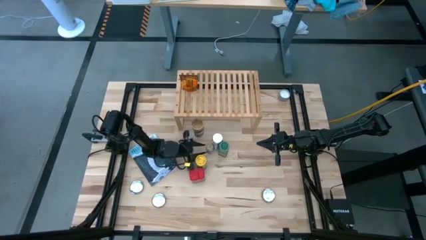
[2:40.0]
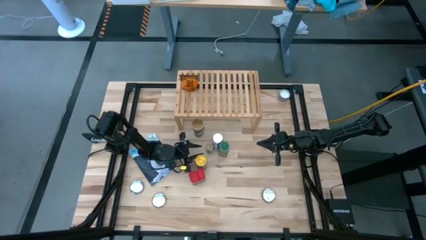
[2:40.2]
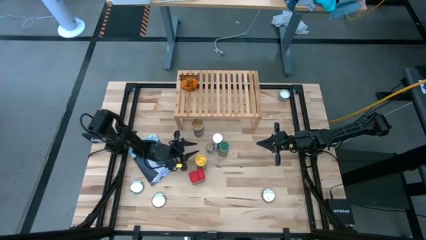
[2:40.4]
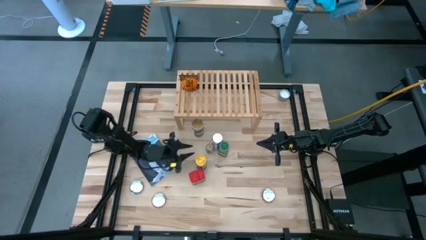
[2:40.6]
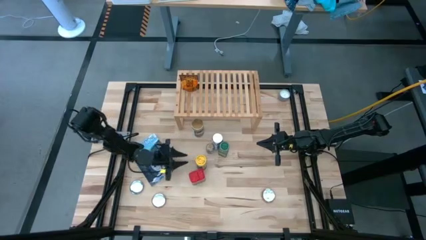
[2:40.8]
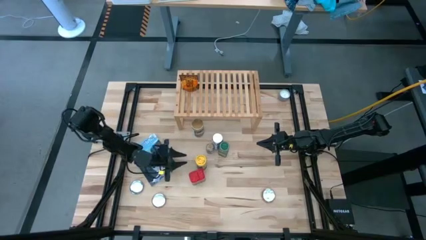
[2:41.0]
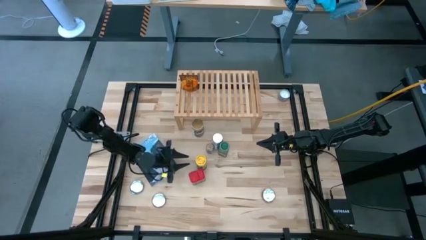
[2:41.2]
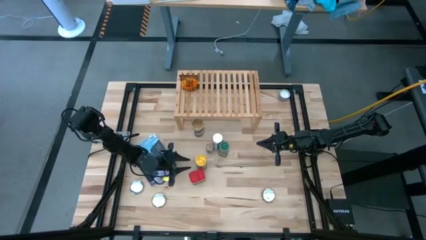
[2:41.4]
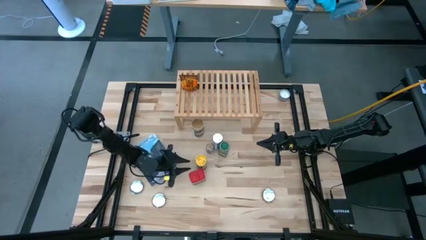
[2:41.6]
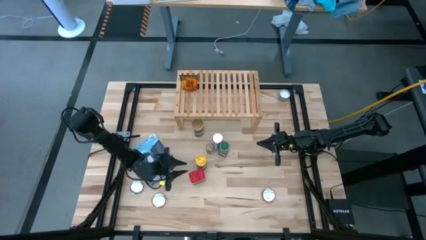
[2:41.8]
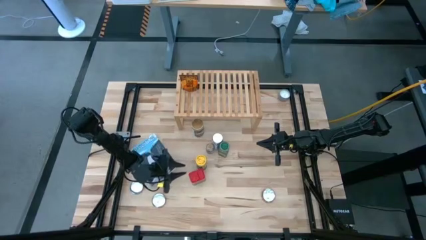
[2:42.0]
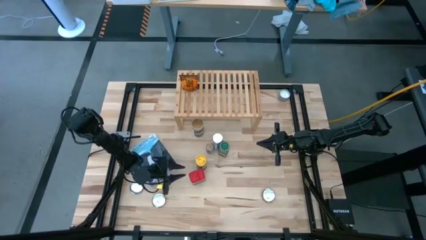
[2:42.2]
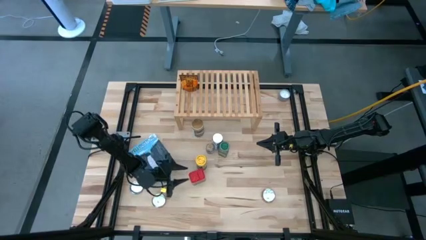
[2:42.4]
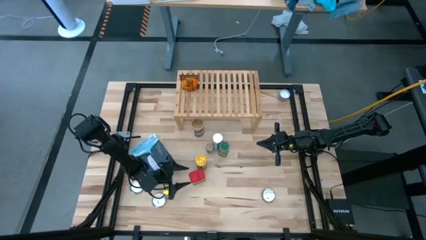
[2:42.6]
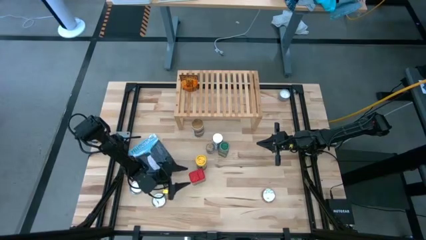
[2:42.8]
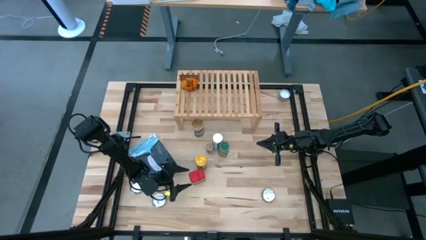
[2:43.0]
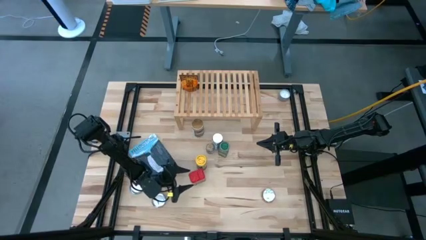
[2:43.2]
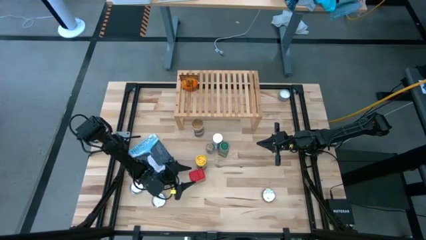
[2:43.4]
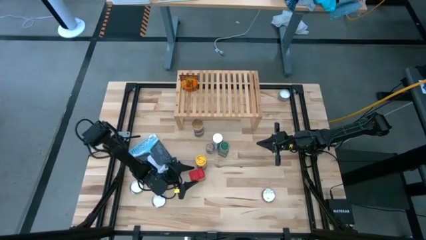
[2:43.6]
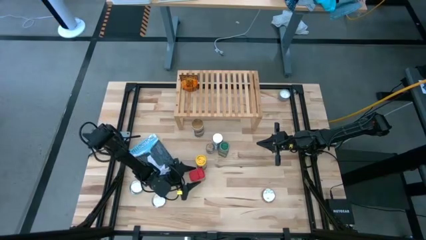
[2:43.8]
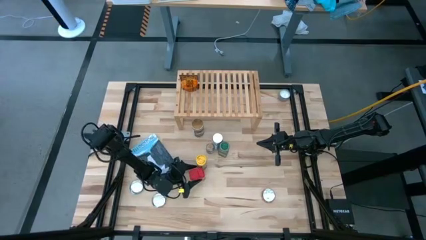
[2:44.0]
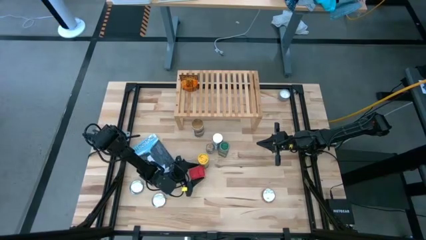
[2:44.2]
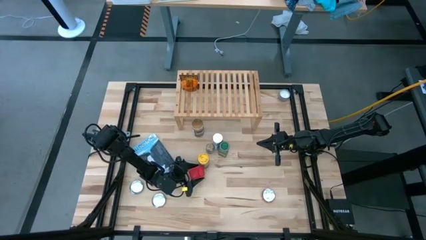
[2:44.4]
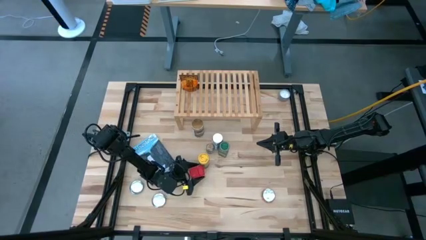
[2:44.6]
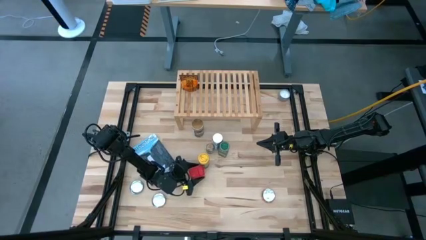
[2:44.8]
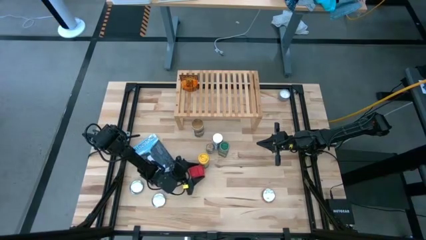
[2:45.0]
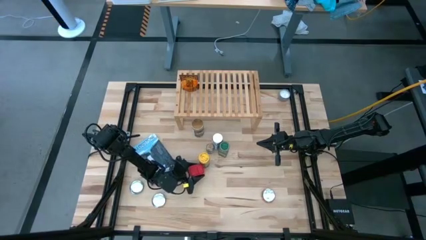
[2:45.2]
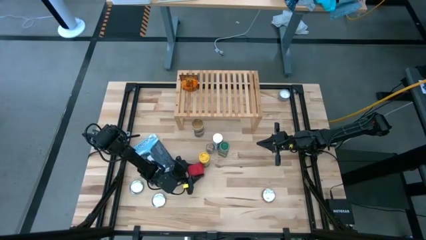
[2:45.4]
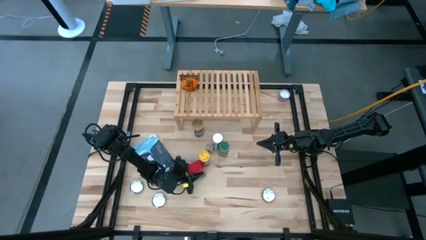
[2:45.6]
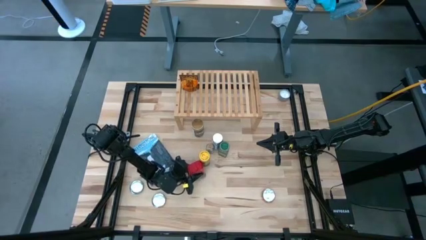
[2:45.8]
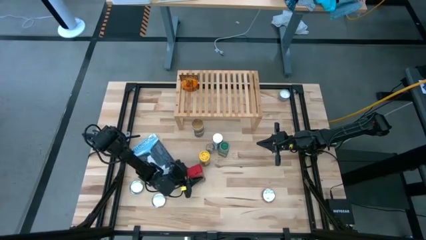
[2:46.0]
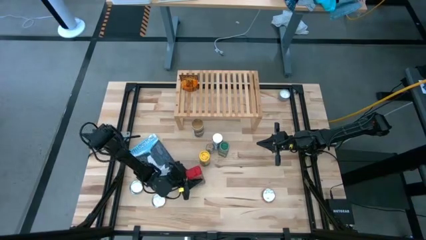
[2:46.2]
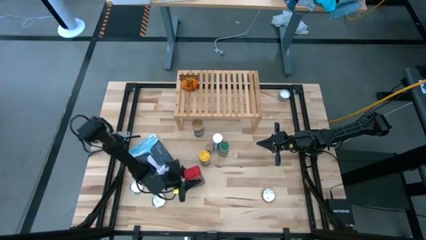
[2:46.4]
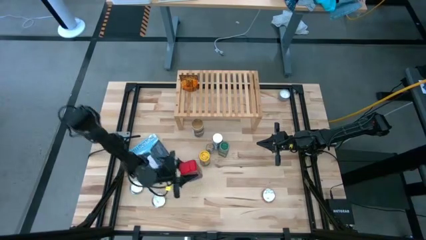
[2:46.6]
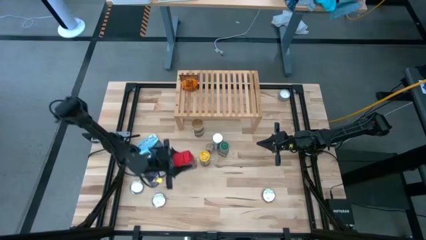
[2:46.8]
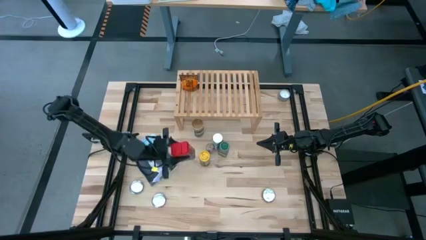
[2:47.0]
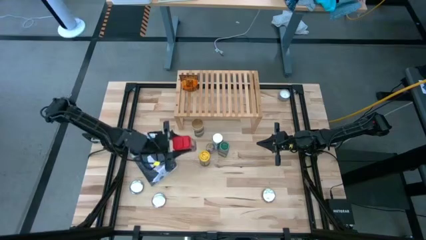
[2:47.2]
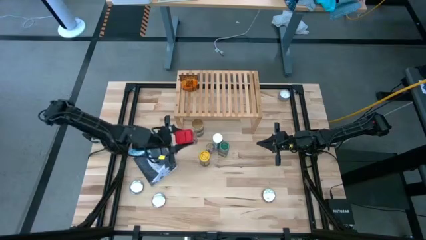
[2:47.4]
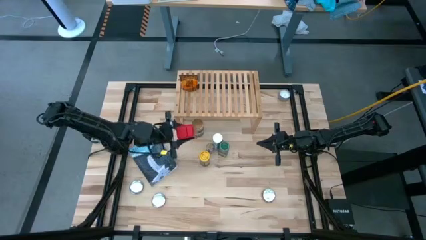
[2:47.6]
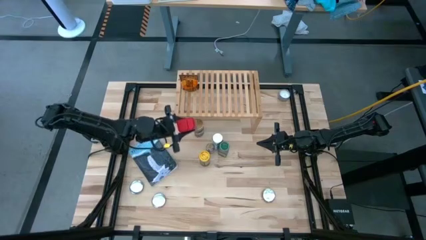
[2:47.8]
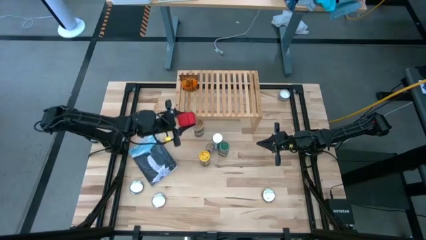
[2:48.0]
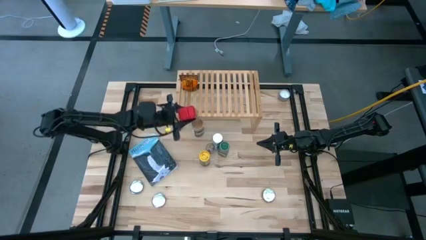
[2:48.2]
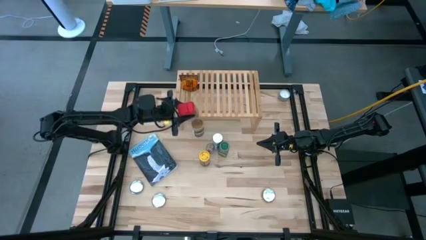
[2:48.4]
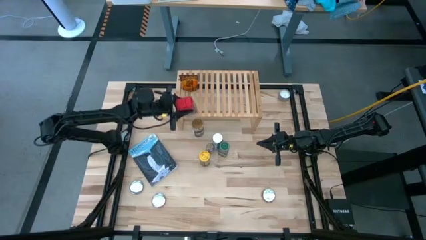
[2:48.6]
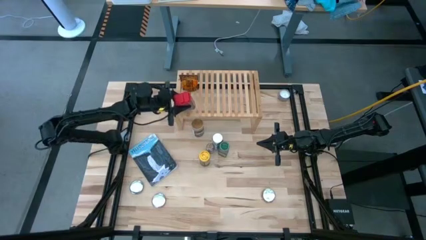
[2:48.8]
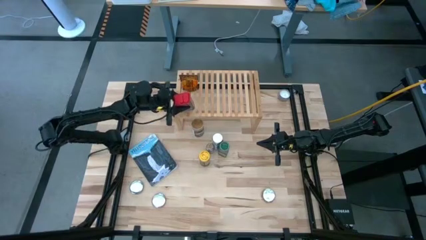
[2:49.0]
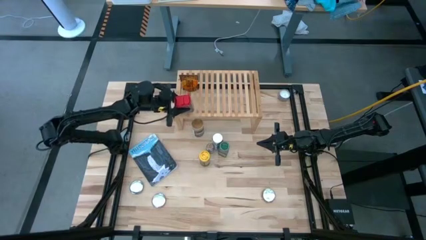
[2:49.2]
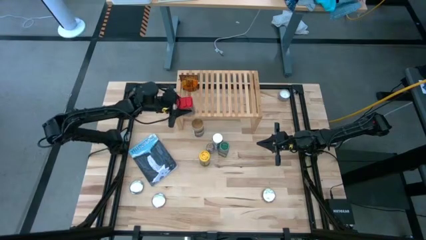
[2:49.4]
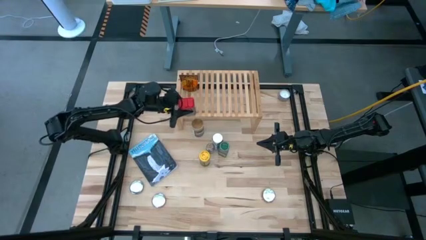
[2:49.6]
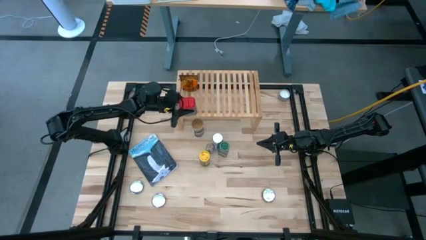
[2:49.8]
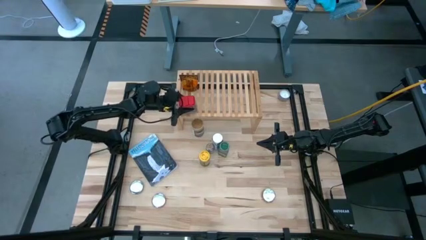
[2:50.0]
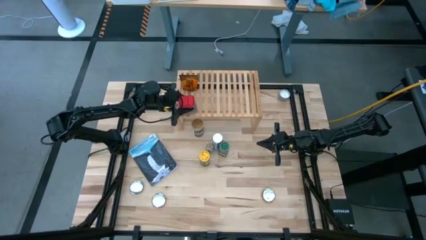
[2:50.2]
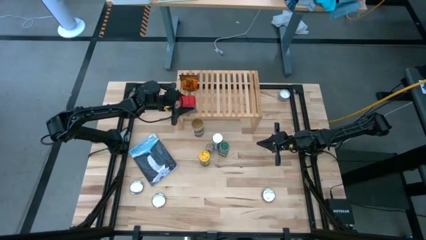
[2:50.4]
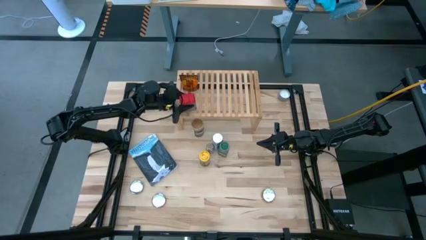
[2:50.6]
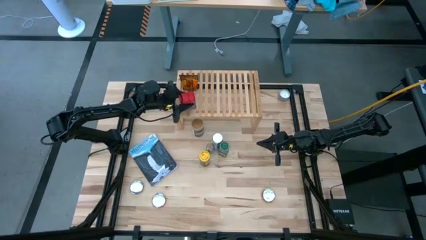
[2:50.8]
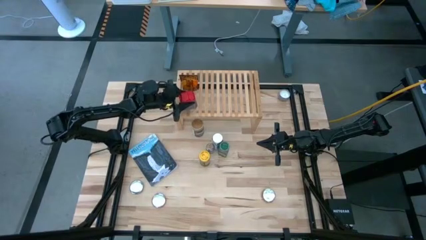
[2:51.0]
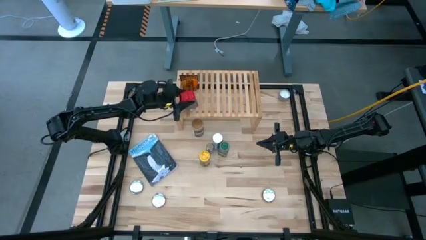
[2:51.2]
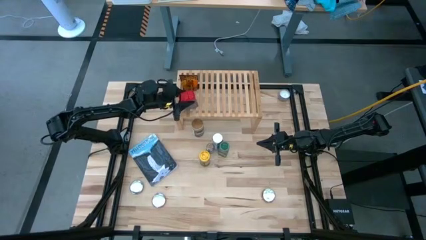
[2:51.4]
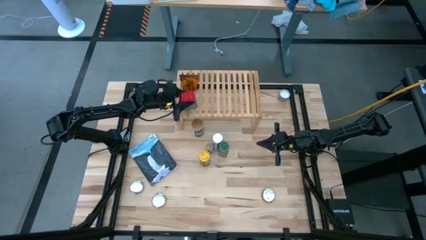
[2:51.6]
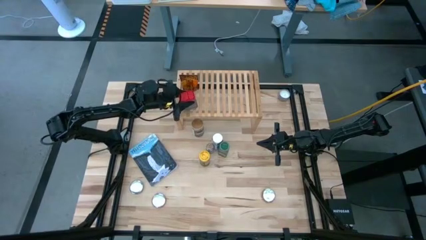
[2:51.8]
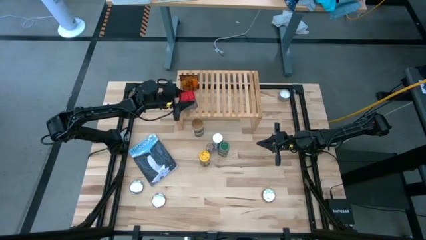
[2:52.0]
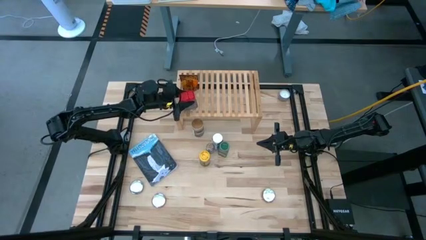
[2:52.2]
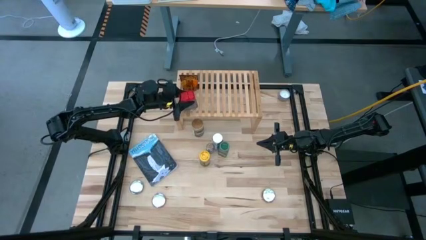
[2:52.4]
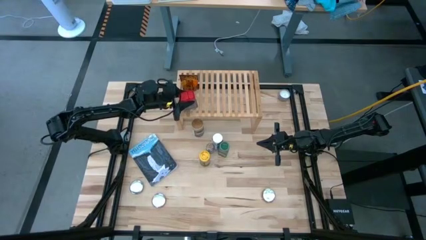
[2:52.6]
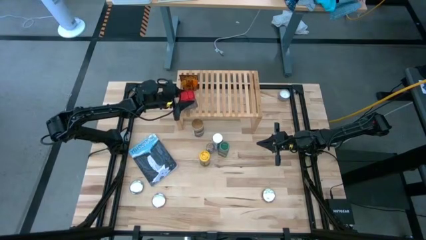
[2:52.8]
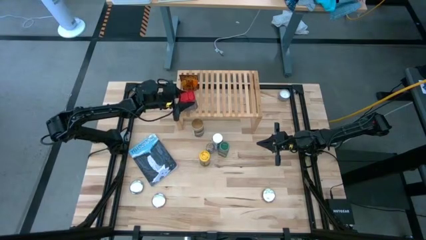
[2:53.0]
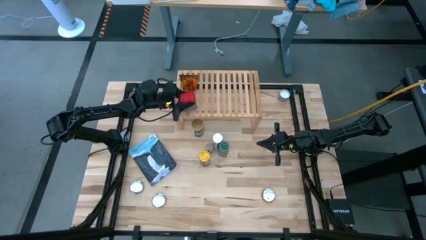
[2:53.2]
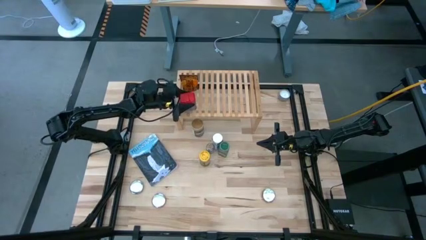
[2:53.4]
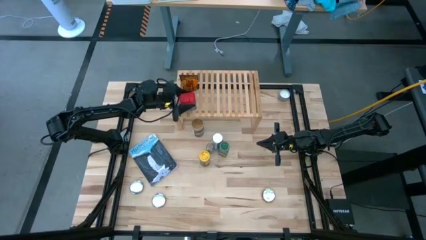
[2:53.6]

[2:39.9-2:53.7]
Task: Shelf spices
Put the red seasoning can on the shelf

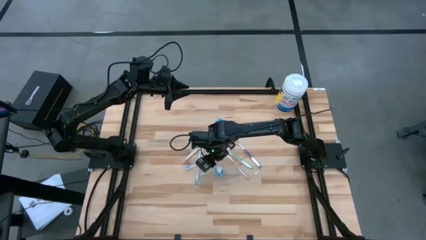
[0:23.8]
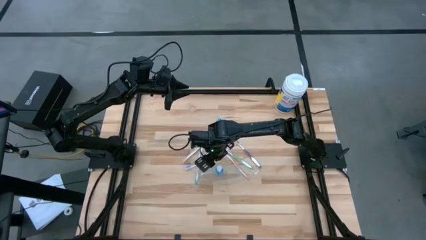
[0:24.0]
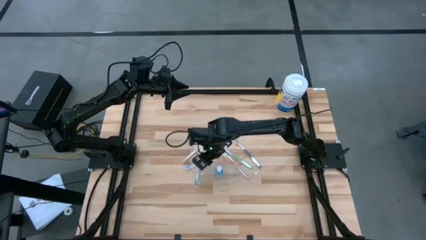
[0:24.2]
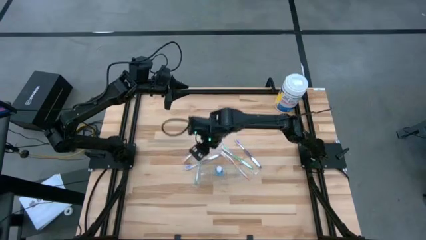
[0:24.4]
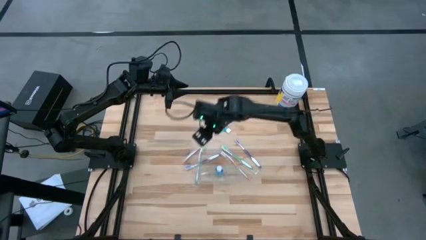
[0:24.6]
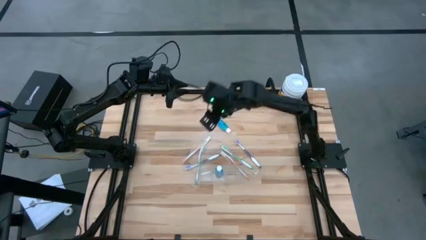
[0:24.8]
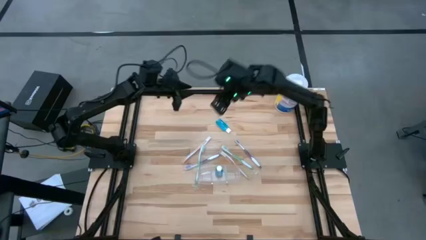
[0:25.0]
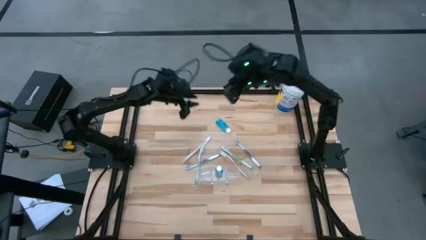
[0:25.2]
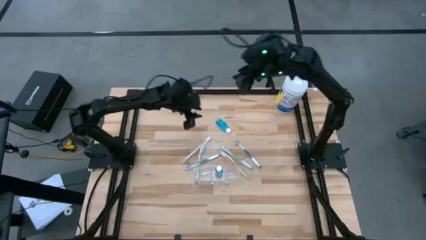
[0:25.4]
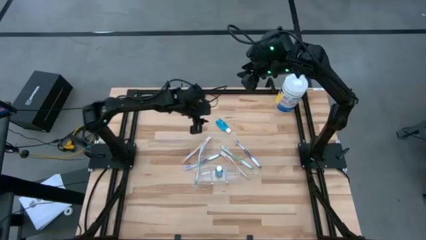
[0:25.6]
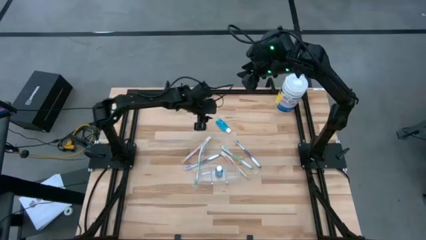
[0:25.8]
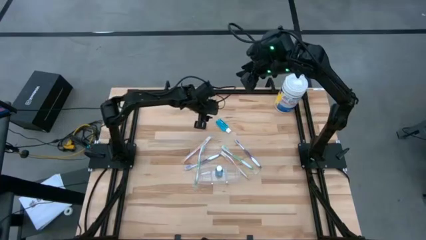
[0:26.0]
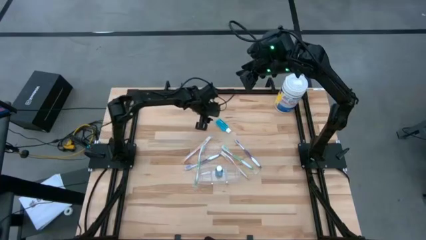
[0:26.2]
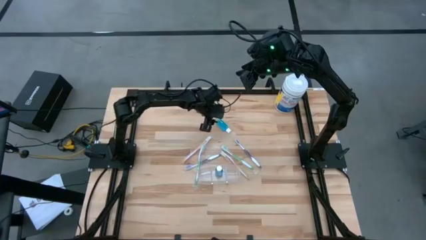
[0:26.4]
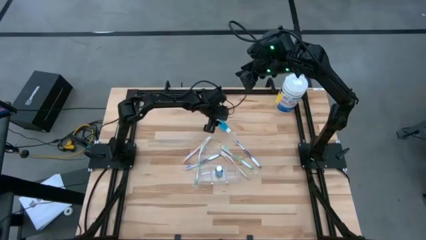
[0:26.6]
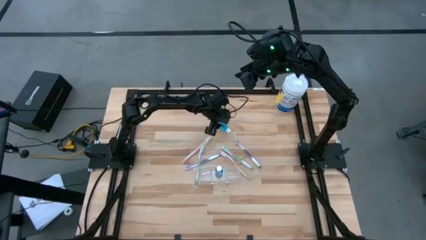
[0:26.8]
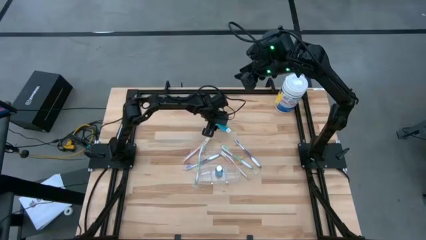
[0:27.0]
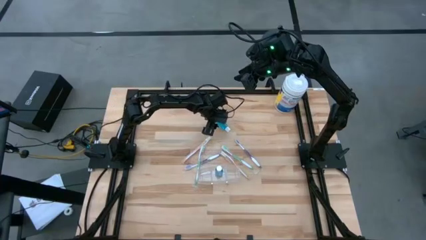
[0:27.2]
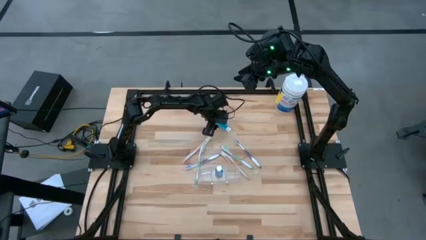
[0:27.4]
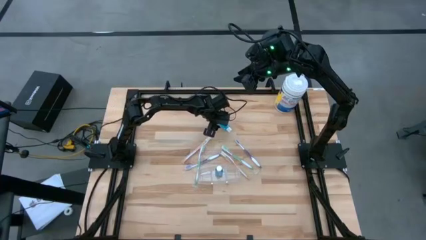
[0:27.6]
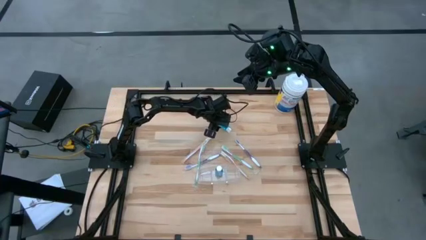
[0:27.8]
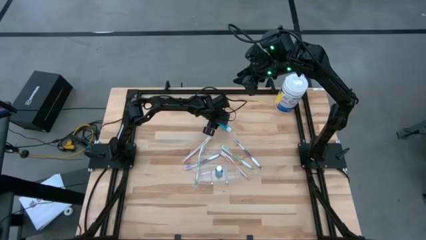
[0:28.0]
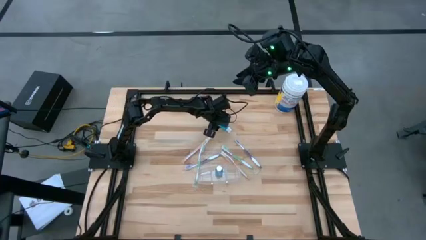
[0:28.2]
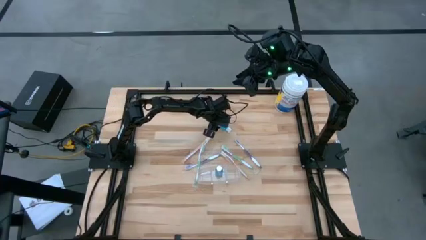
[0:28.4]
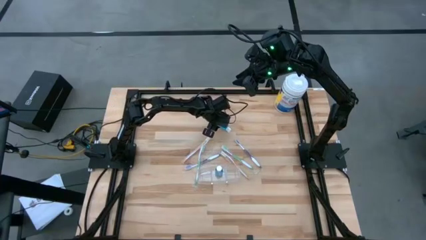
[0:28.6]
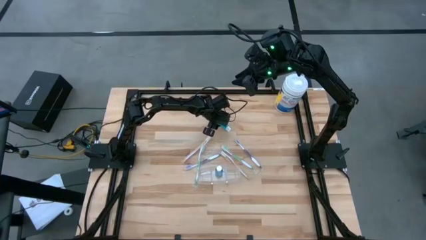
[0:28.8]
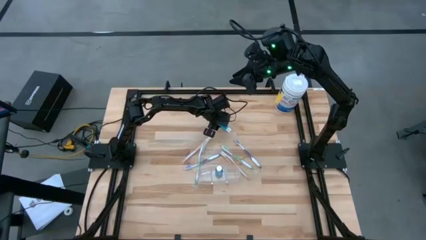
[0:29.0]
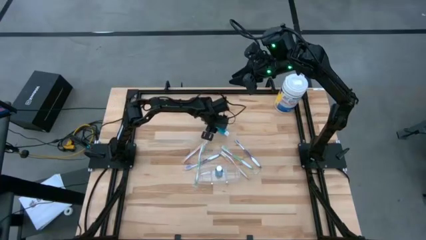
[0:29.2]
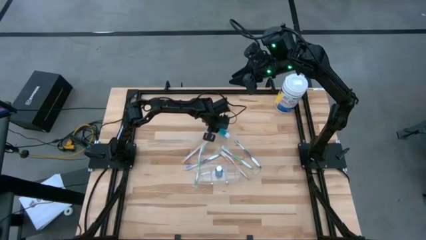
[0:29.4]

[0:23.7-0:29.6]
Task: Pick & Place toothbrushing station
Put the blue mouthwash into the transparent organizer
